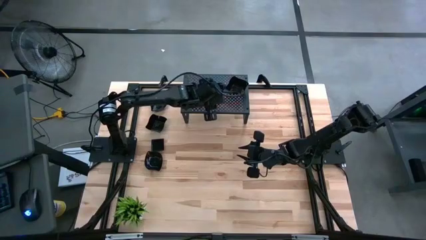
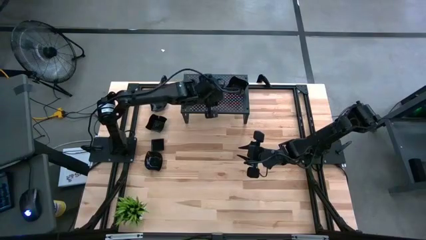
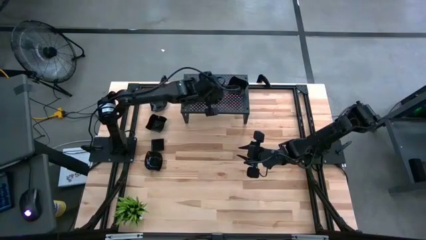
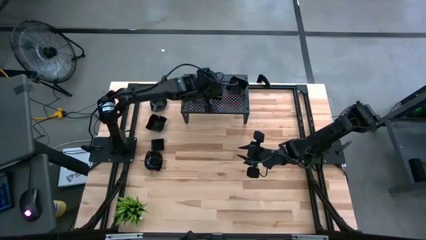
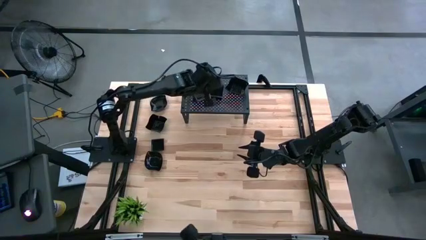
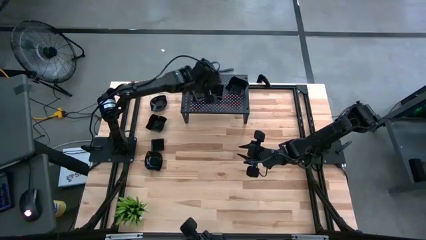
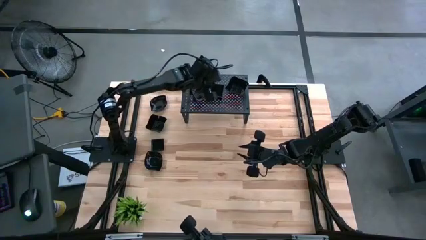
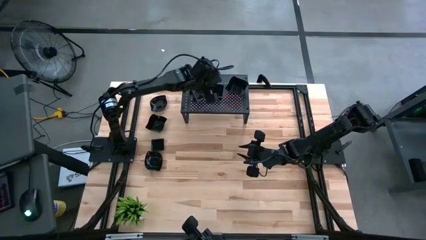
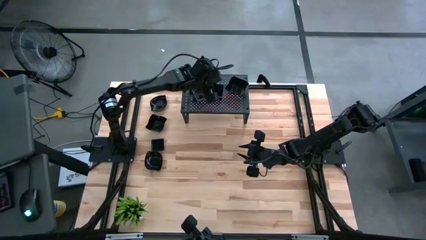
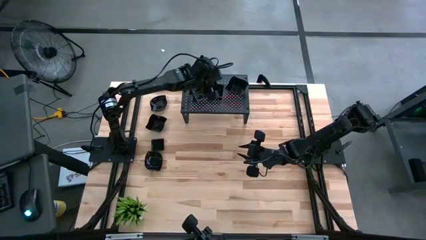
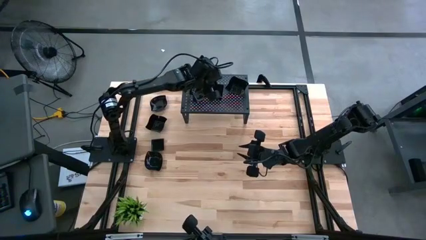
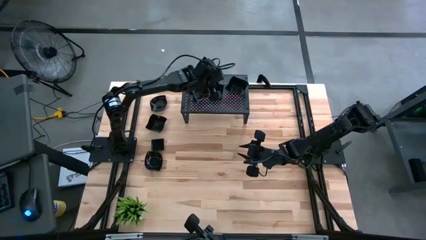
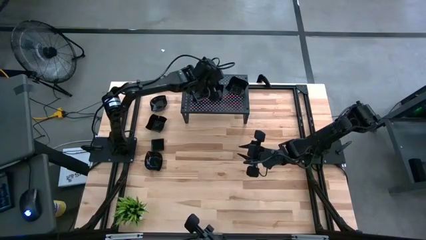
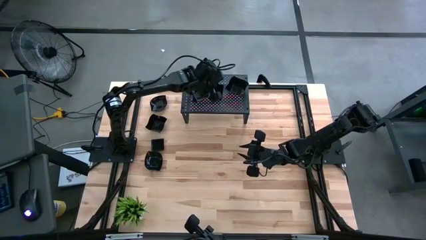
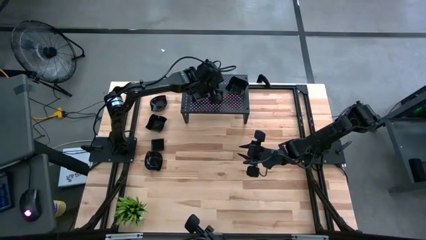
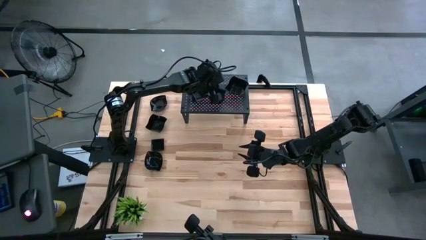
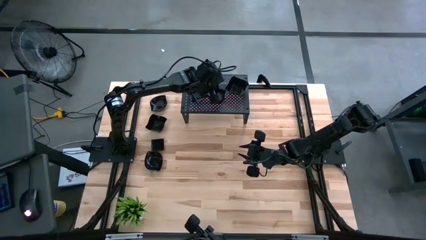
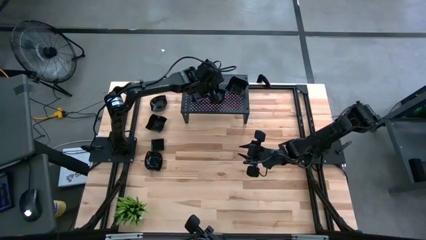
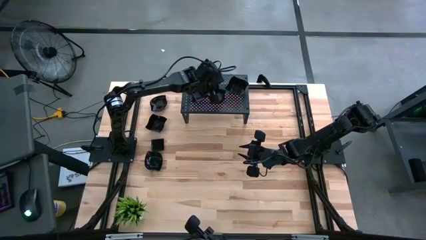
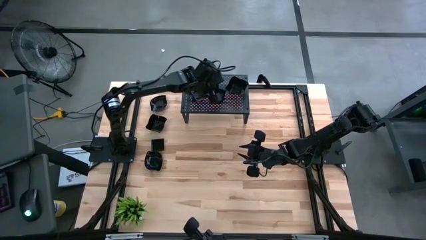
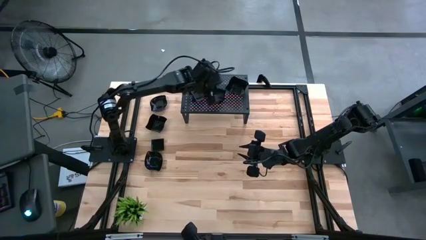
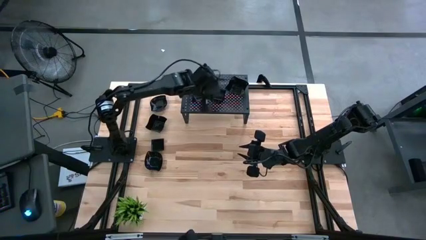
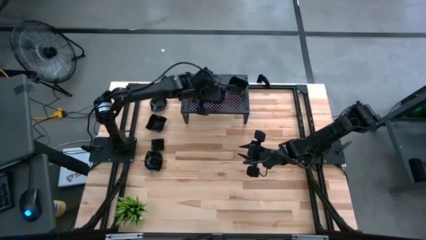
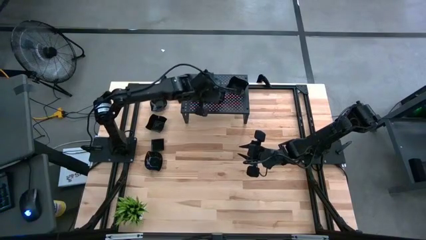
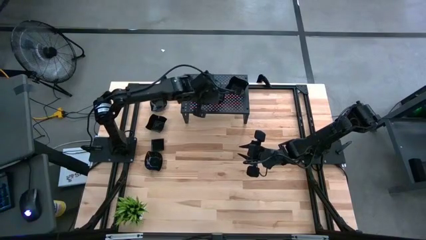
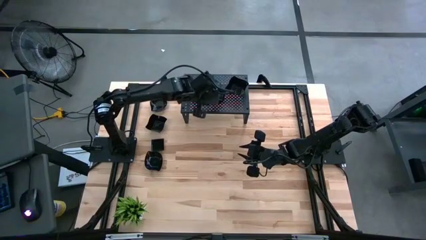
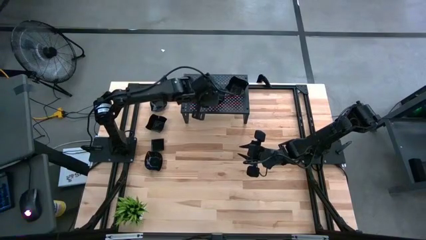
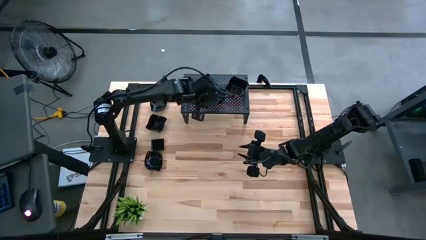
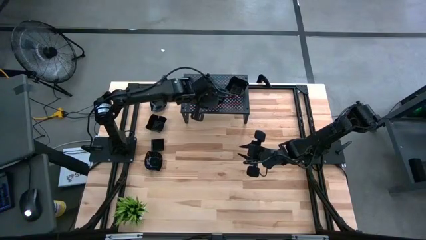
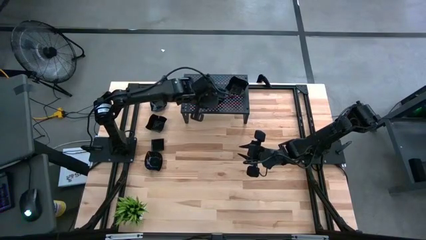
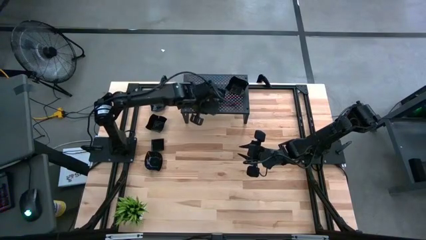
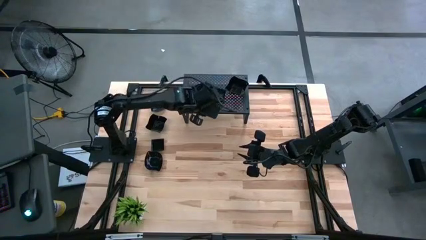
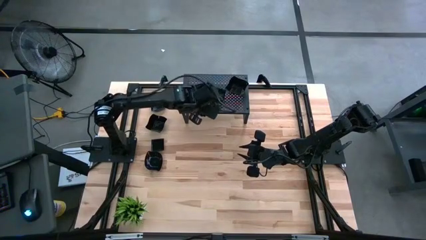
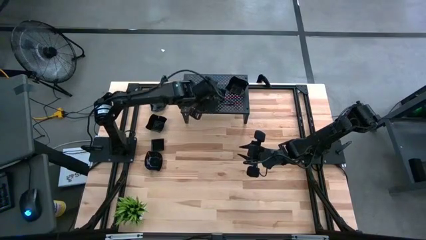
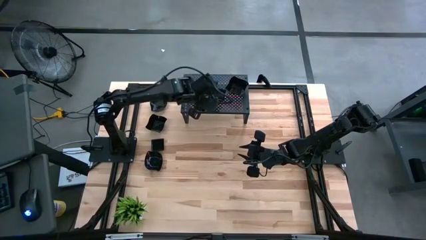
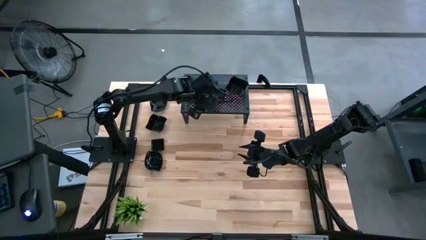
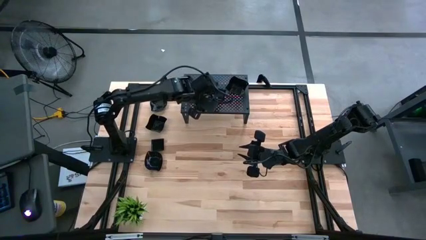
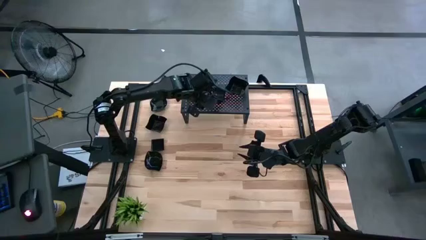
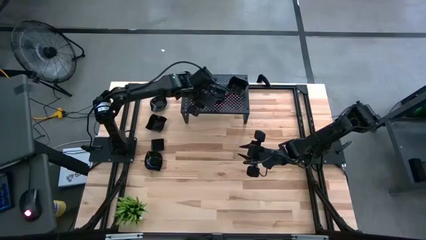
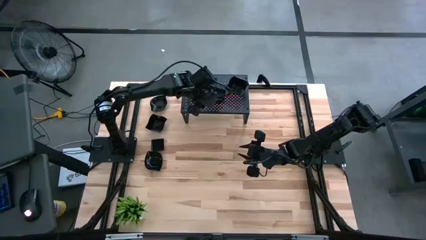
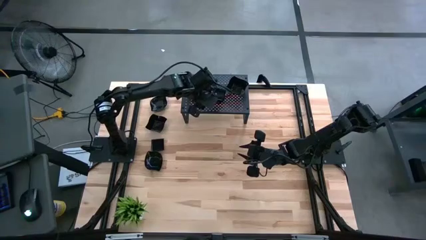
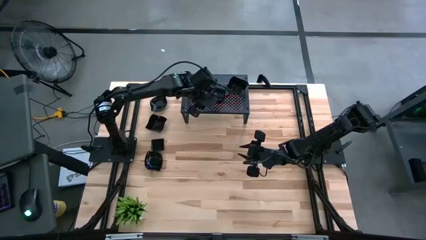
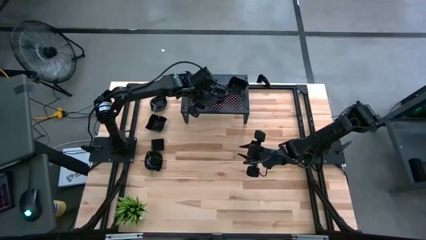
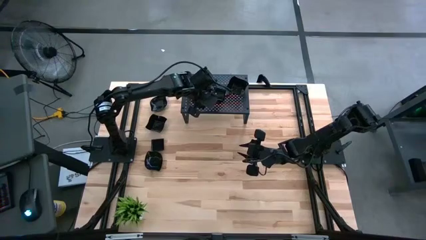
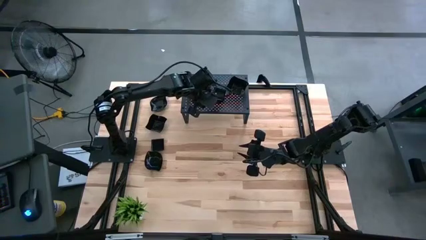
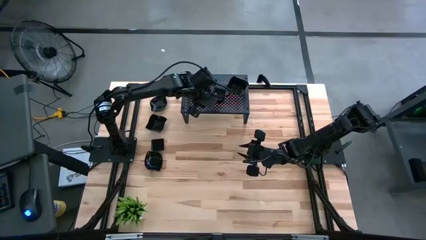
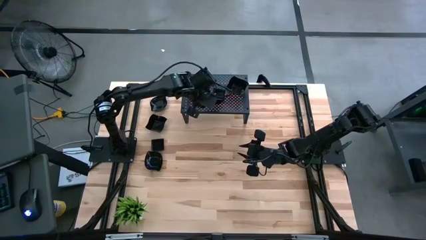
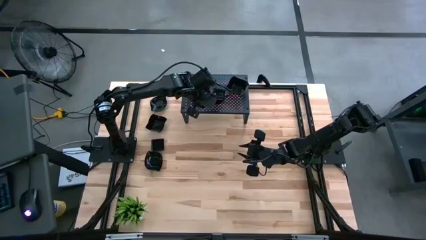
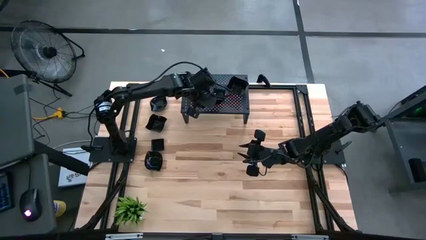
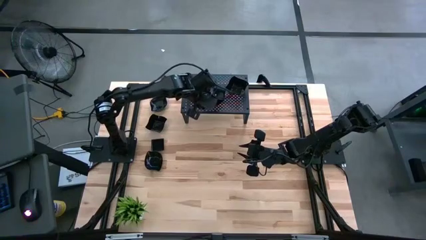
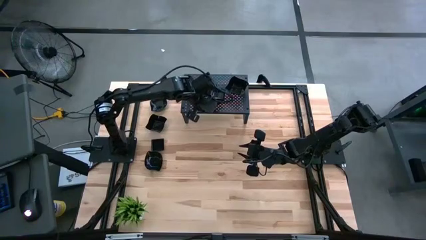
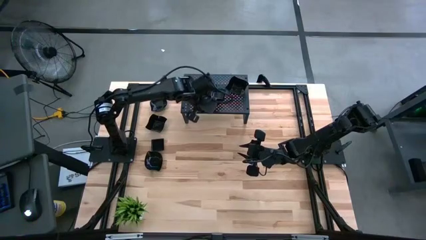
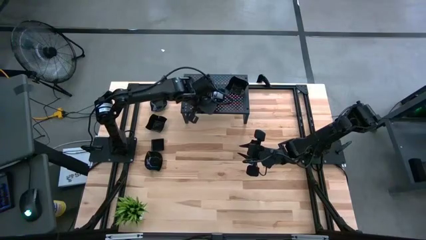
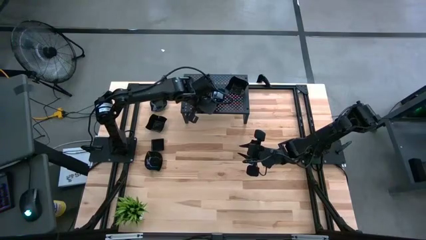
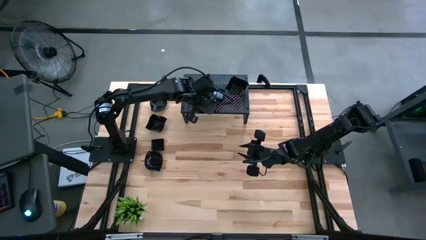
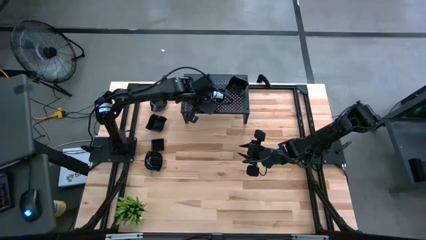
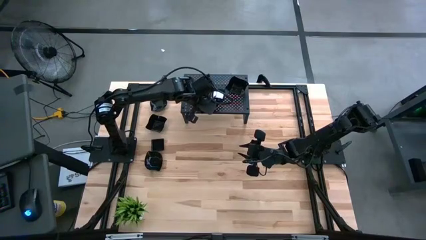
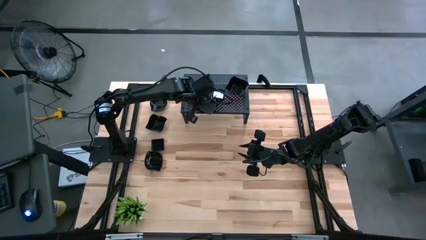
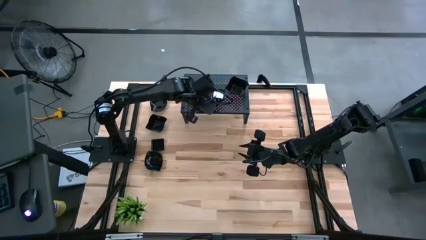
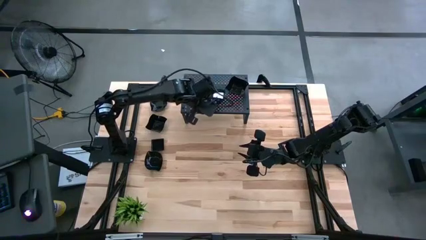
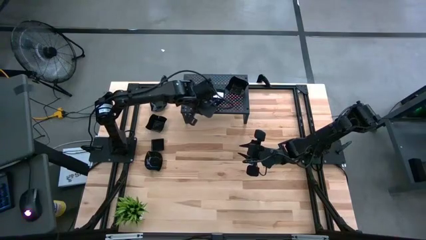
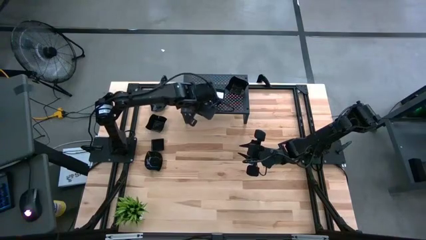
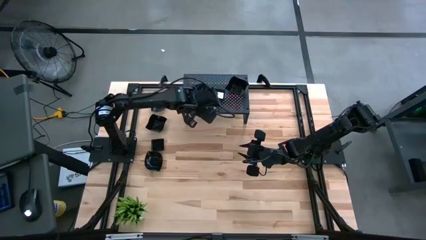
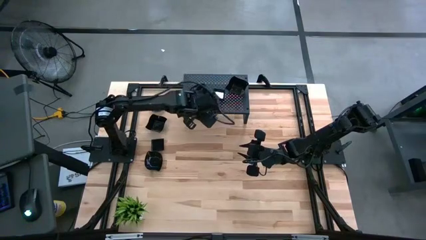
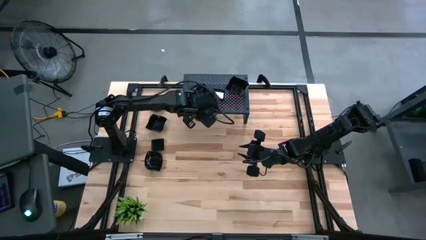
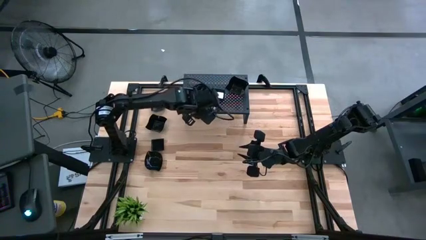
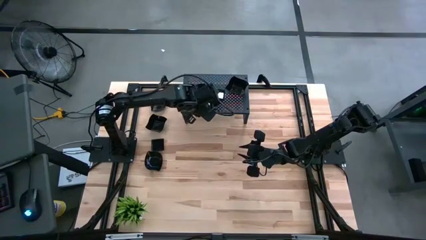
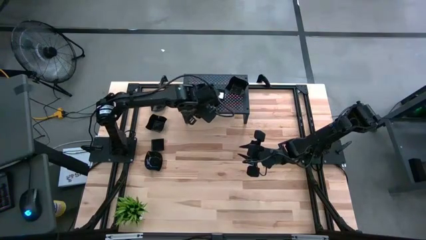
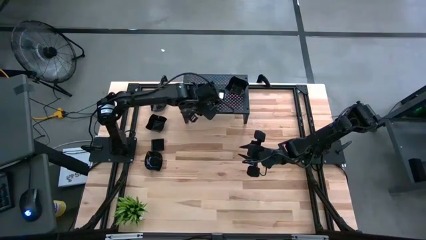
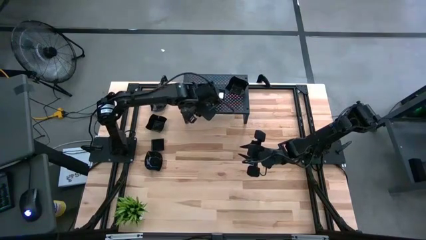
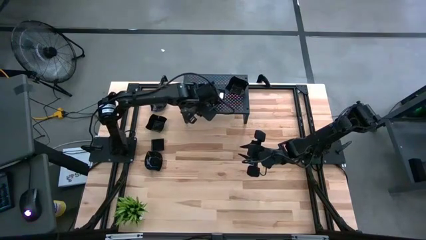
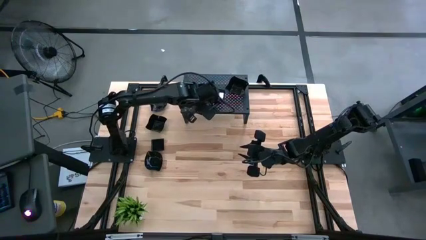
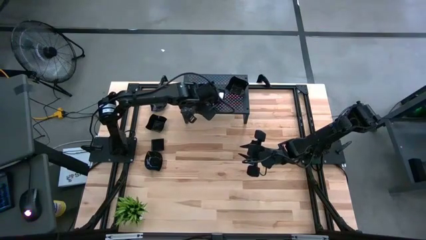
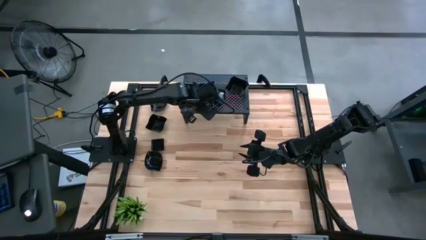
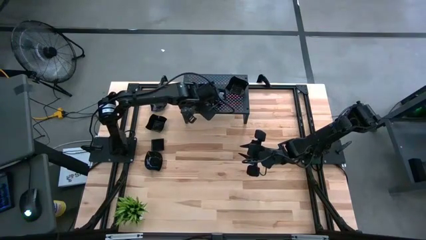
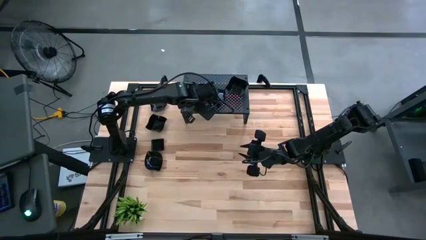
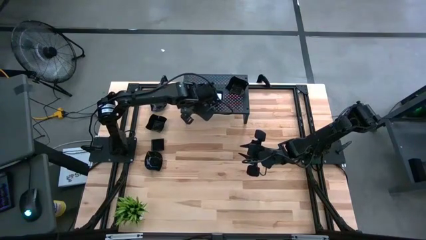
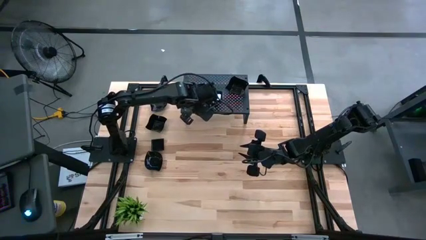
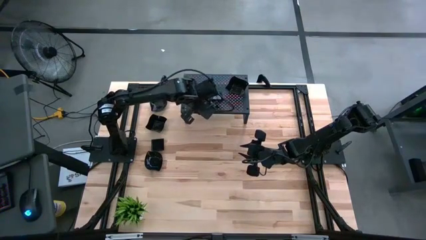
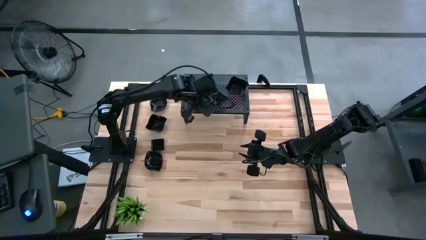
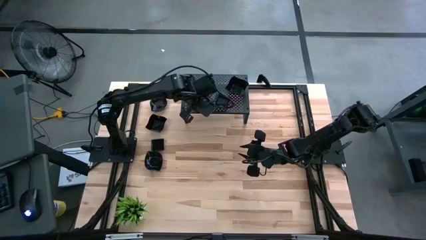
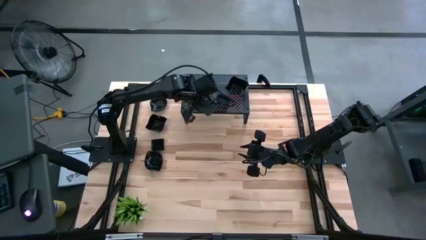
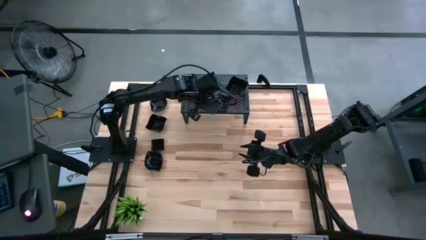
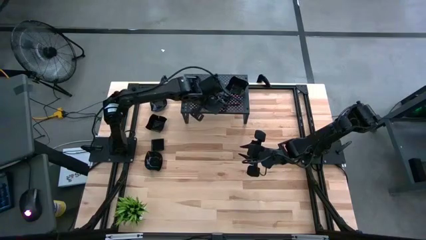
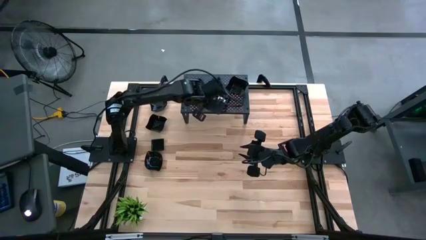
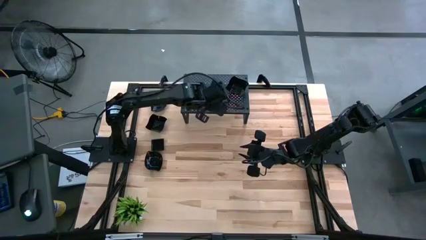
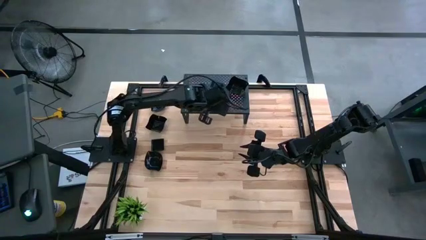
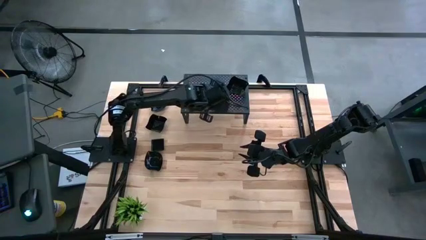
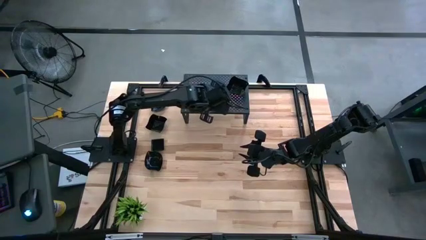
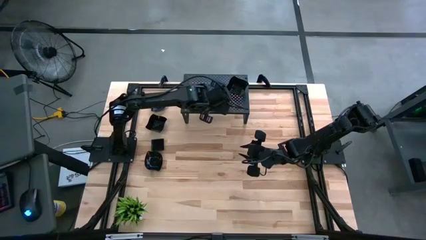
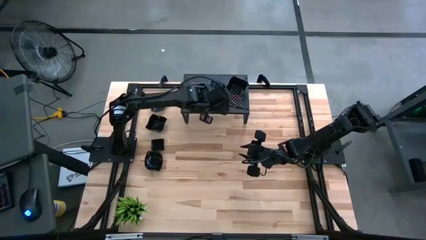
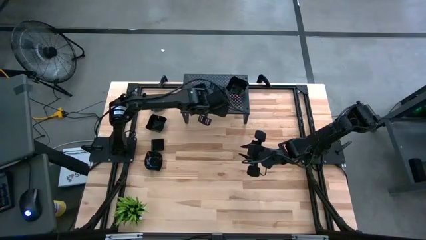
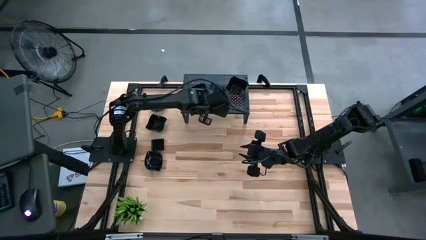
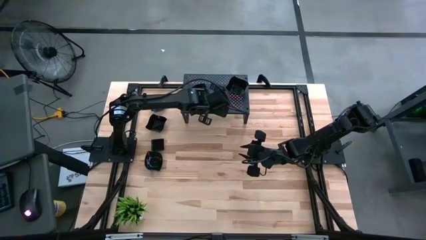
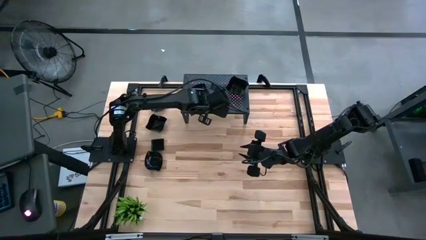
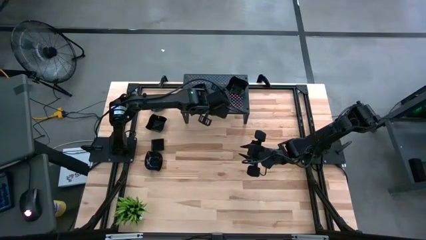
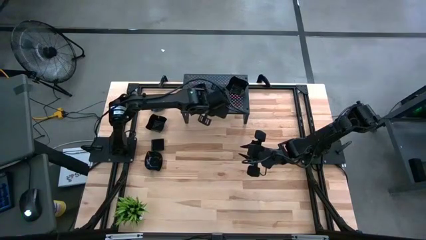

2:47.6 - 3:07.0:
Task: Pick & Place Mini shaped plates
Adjust the black stacked square plate
